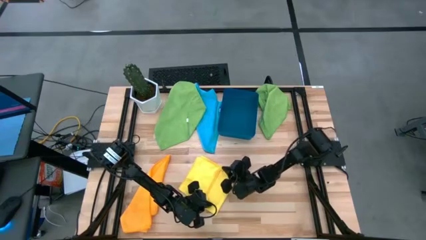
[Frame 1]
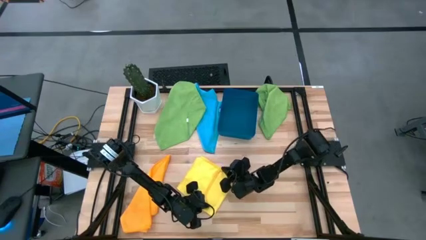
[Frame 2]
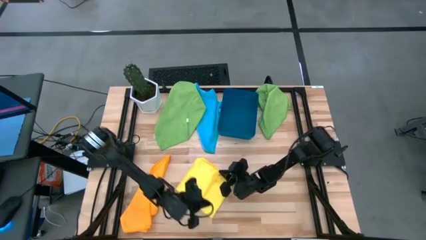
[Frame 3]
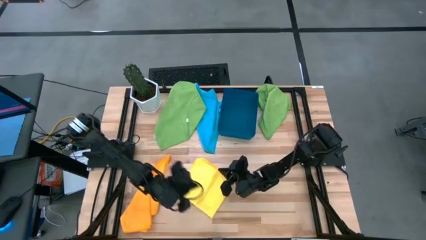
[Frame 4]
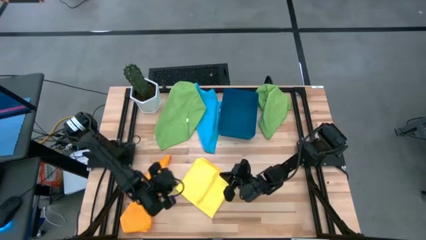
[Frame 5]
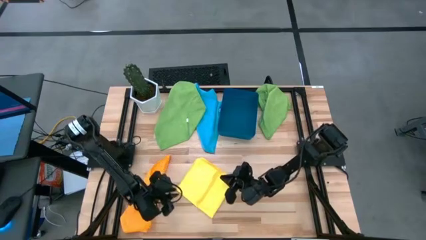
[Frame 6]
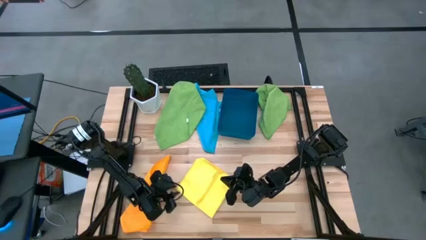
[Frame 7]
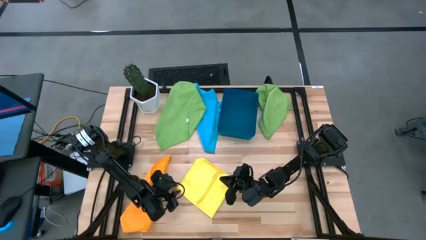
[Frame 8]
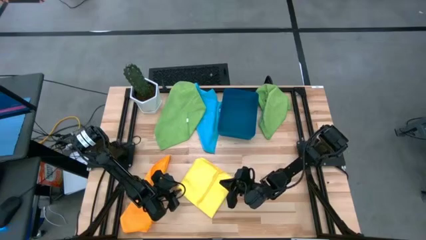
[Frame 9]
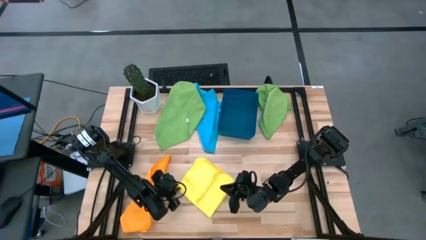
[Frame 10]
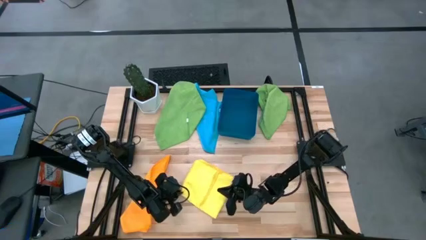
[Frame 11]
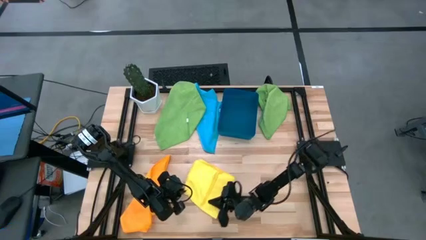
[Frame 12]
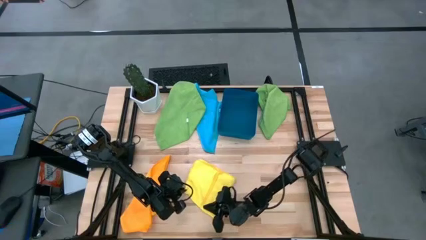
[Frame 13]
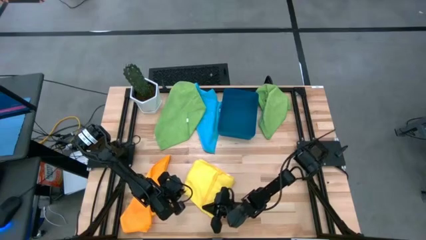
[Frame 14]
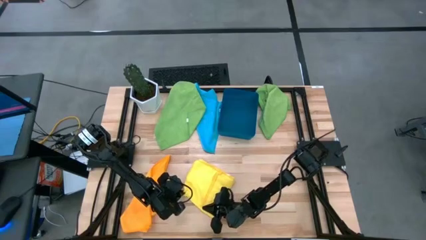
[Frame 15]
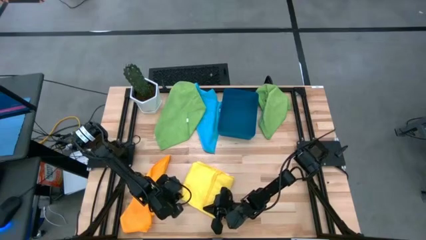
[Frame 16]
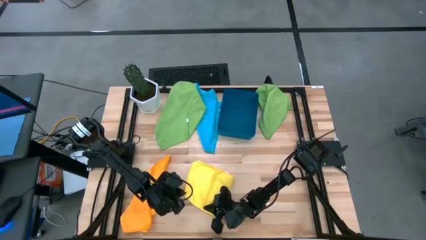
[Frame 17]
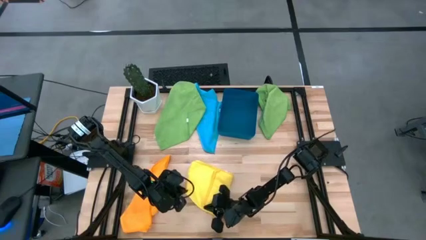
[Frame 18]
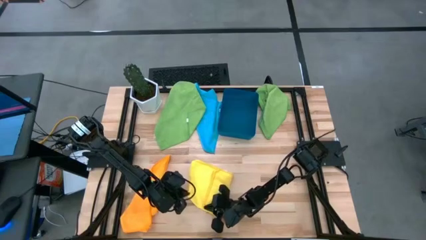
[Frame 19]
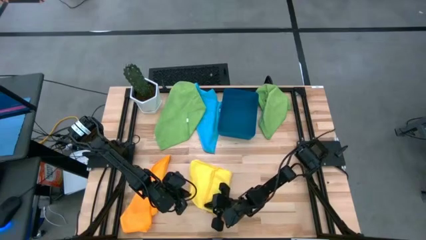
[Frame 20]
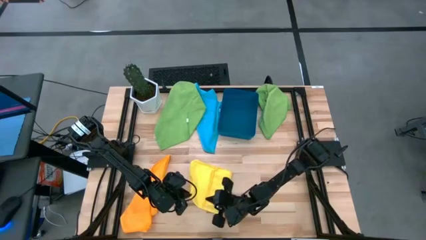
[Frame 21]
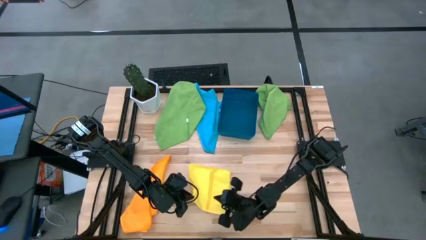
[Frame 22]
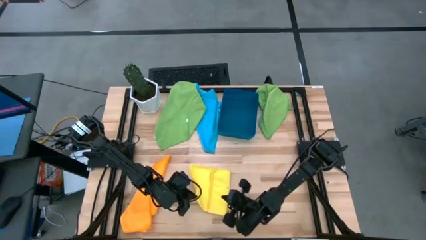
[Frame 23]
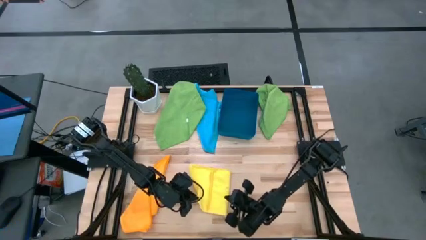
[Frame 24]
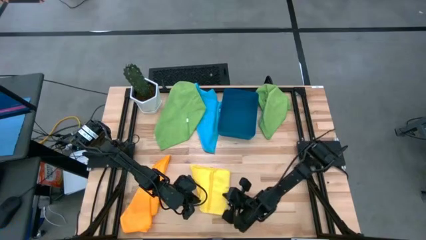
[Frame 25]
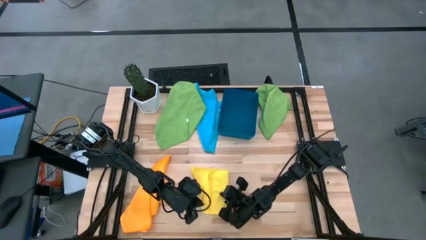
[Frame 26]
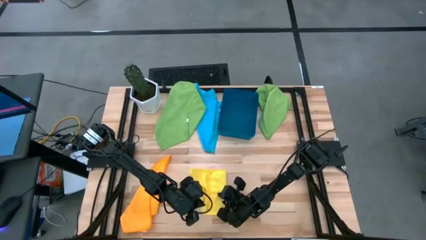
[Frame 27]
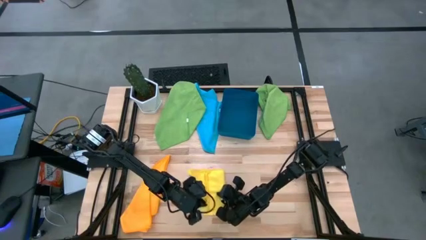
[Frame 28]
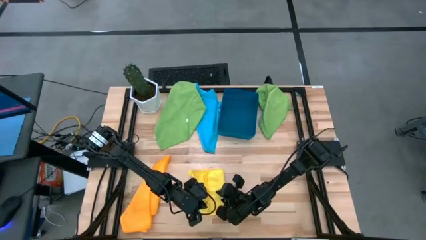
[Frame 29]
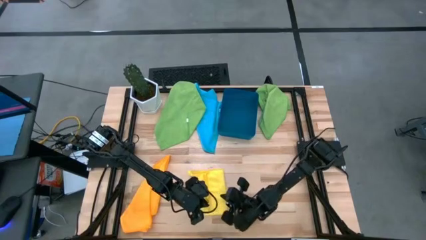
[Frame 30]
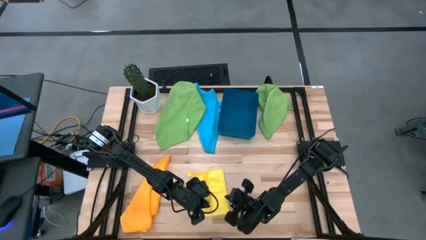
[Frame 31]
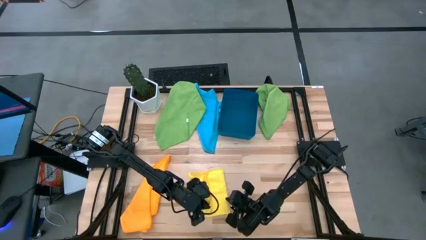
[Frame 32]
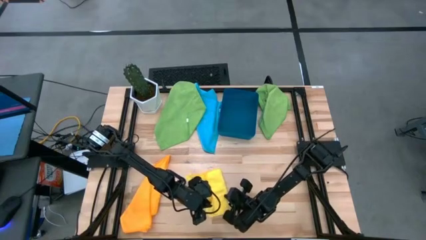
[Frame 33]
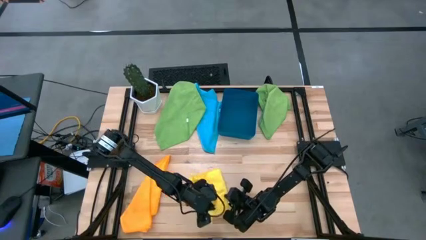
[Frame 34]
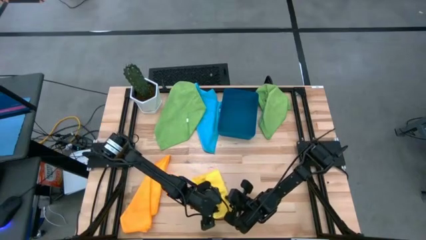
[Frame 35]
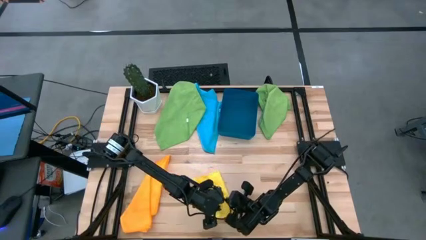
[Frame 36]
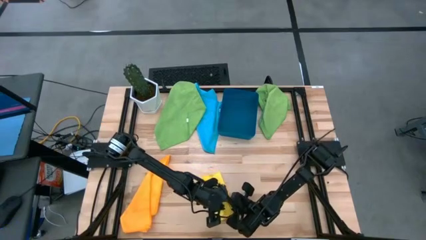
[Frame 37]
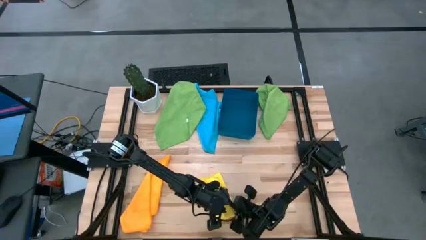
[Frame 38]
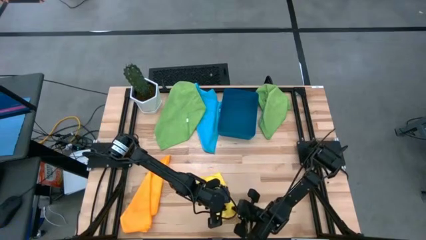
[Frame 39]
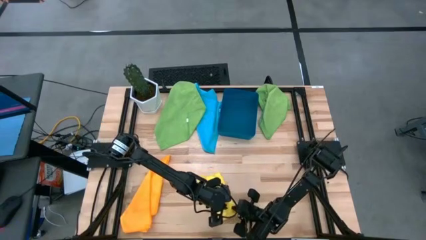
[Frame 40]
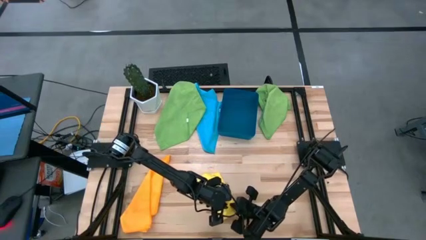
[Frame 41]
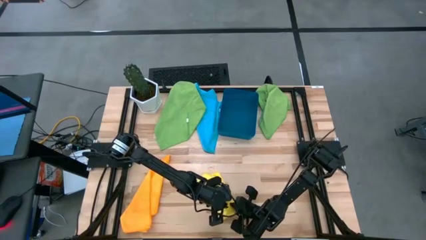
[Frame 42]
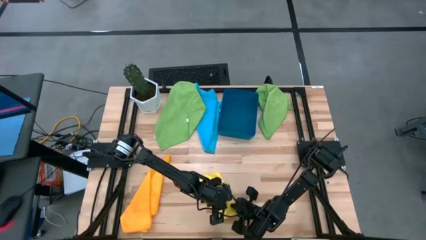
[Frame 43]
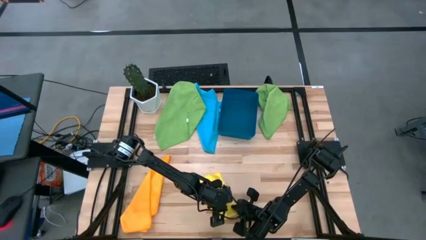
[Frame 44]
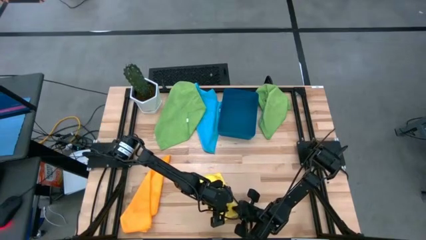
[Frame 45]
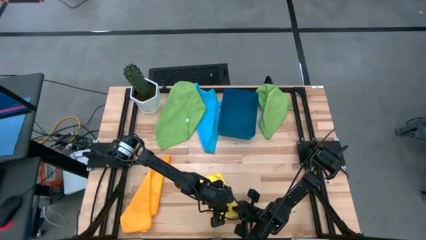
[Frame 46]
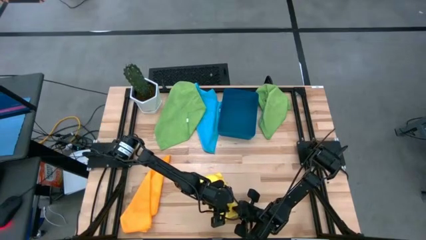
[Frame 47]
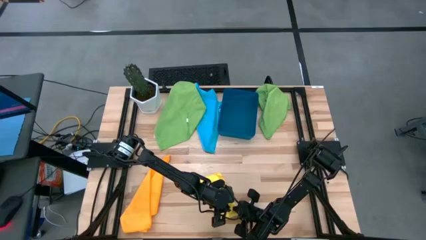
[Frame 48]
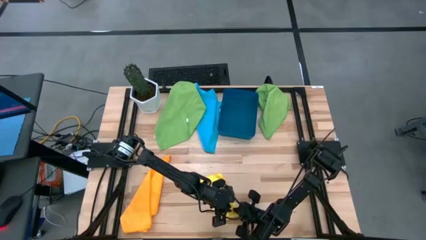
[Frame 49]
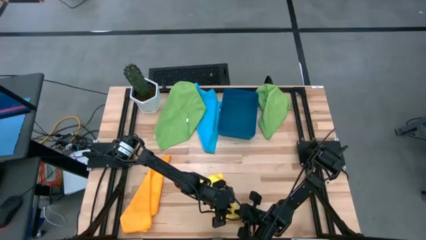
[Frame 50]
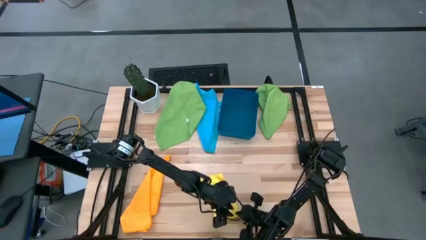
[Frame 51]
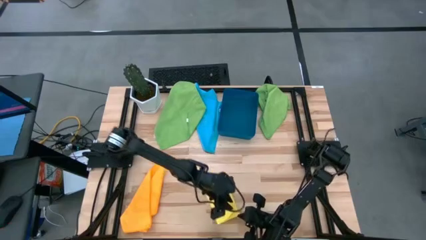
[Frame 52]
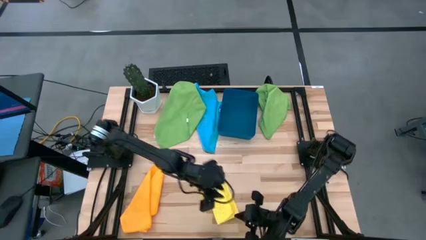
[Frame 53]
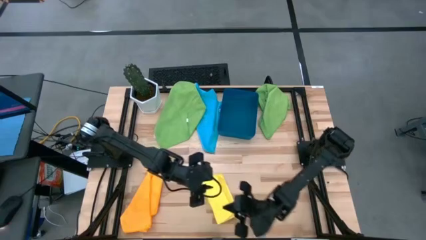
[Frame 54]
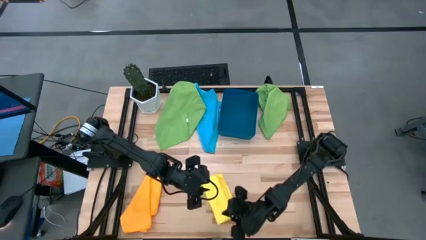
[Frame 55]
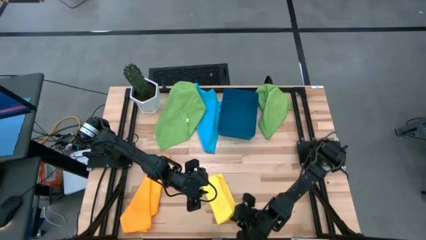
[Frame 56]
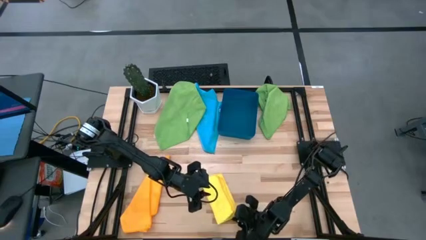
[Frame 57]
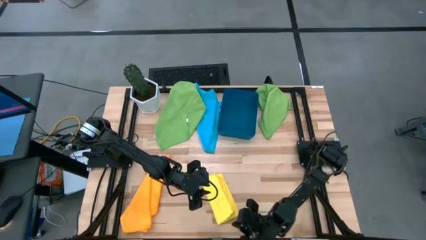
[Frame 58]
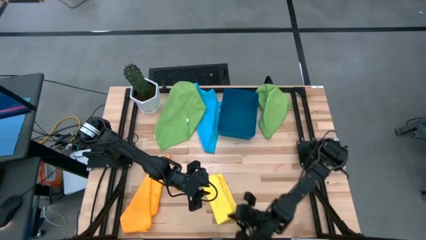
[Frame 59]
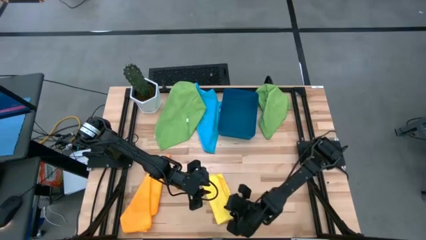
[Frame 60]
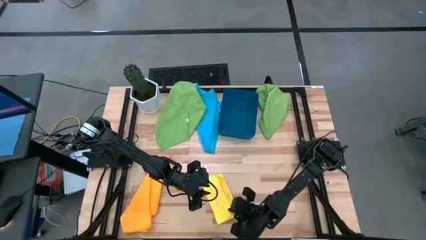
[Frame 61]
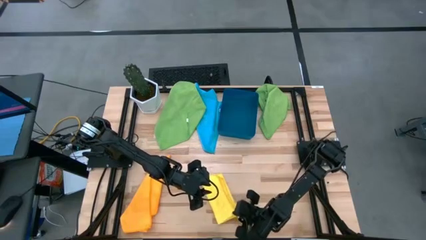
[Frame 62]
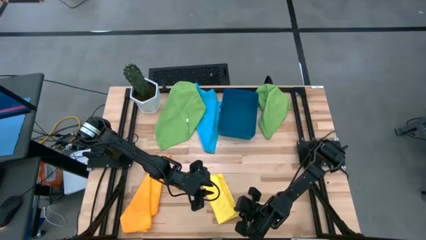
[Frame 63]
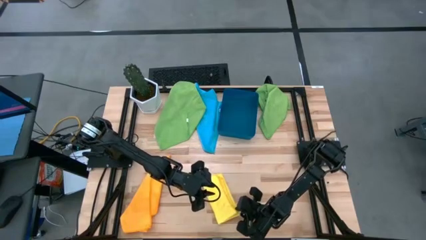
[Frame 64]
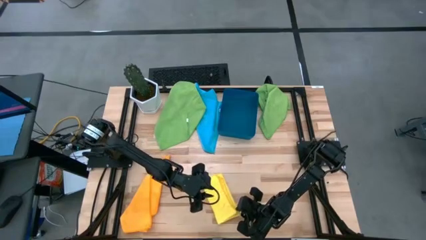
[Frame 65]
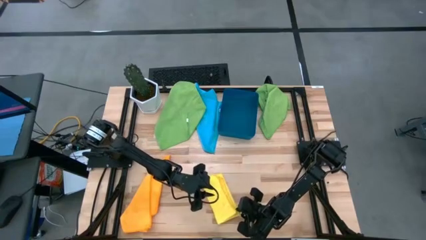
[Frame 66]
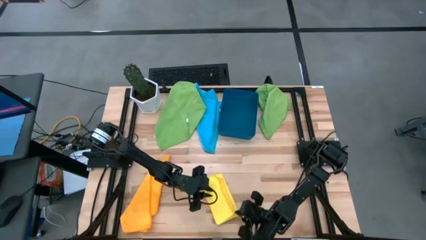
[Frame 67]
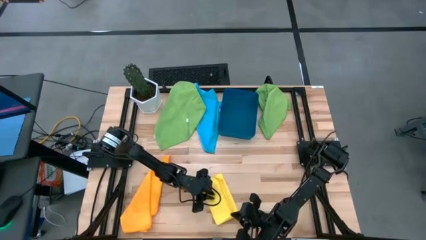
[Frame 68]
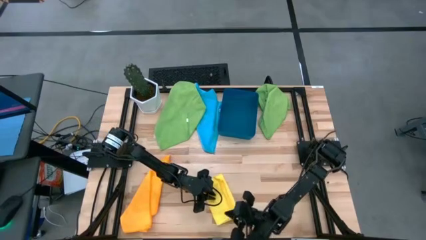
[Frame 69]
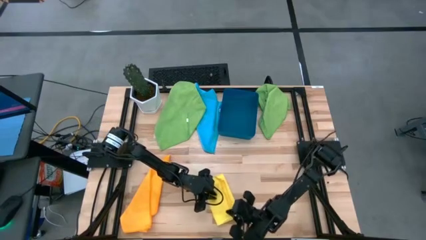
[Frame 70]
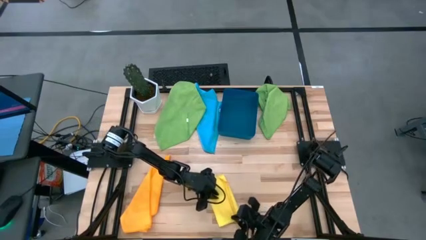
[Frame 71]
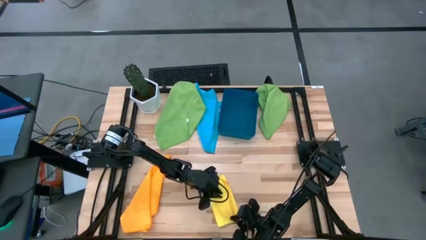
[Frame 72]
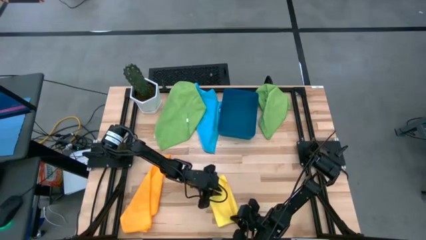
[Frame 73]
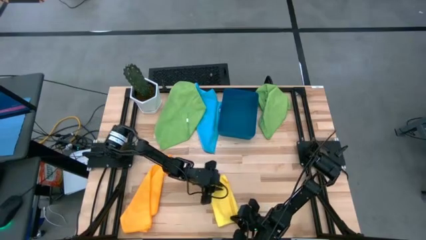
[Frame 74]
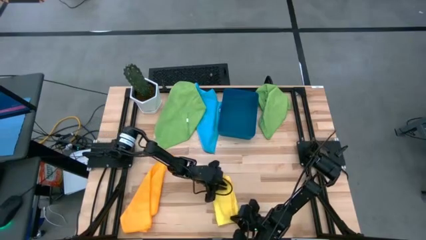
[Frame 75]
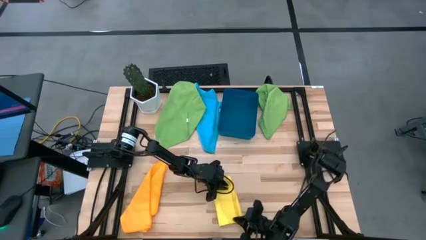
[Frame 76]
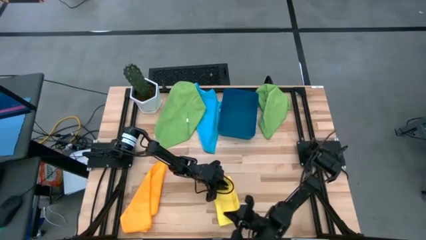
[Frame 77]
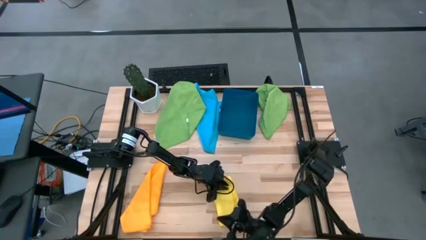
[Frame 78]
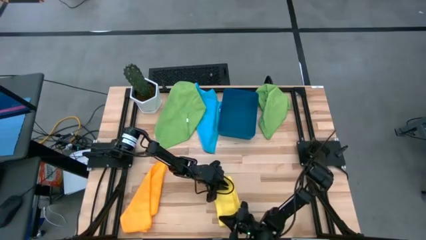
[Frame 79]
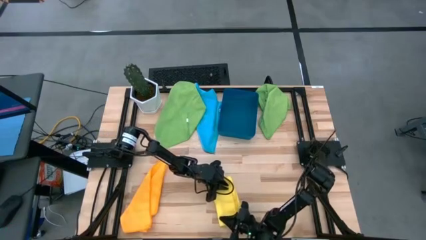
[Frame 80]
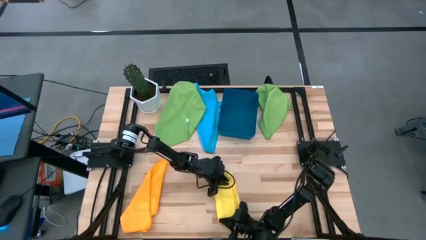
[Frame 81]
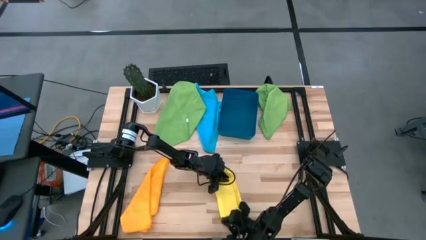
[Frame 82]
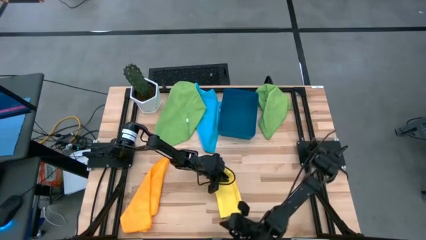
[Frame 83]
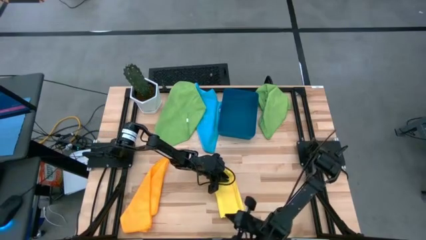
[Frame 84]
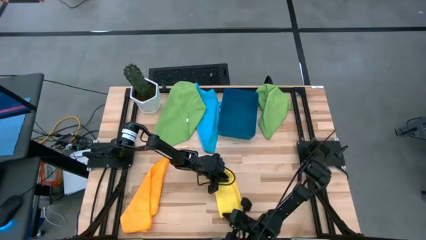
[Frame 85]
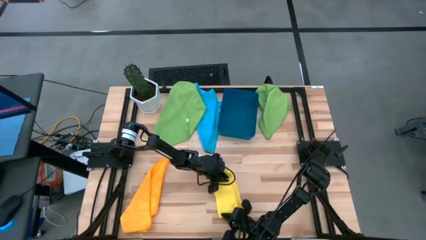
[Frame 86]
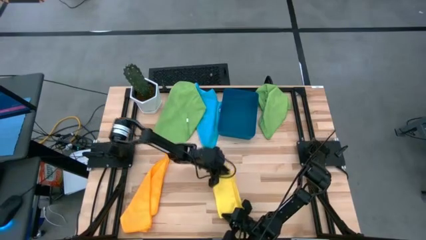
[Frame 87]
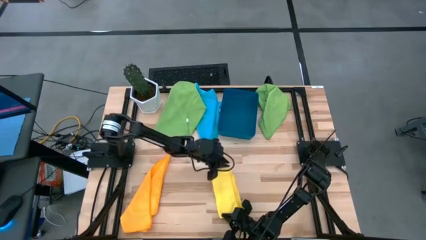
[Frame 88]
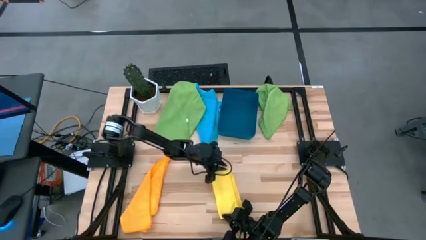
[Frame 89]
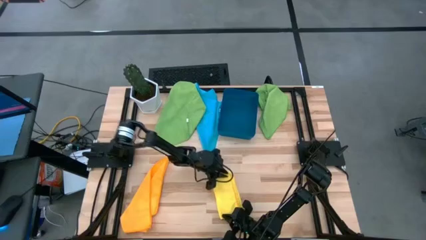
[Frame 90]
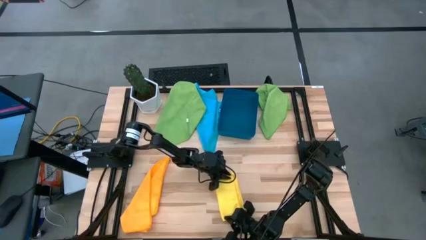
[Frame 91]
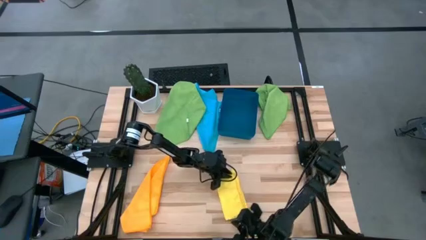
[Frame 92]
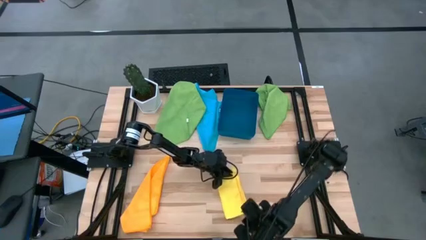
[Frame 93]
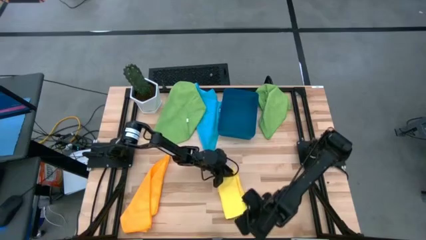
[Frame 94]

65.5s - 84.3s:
Task: Fold microfiber towels
Fold the yellow towel
